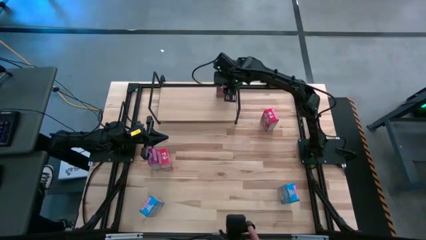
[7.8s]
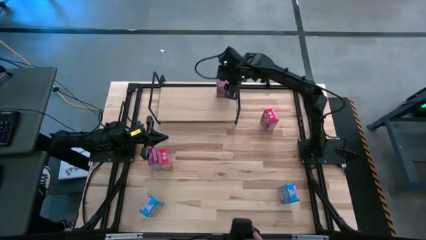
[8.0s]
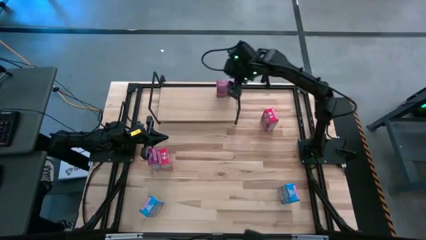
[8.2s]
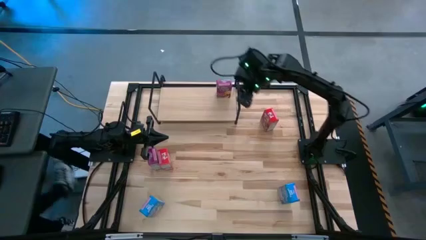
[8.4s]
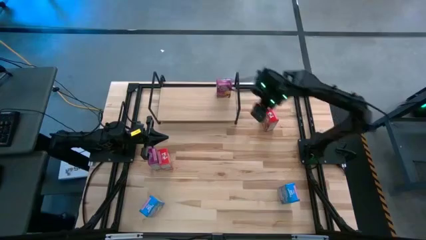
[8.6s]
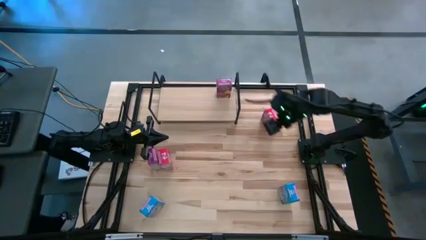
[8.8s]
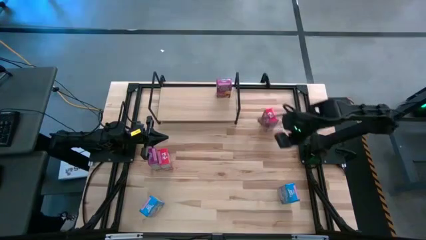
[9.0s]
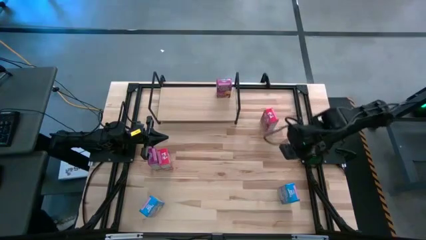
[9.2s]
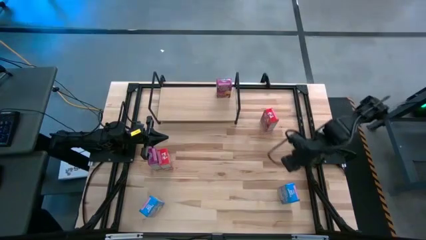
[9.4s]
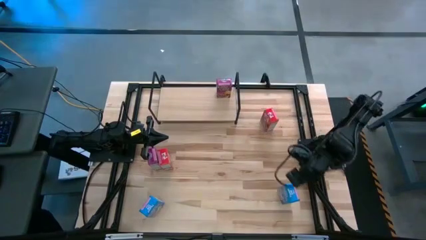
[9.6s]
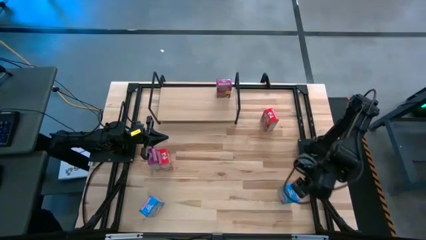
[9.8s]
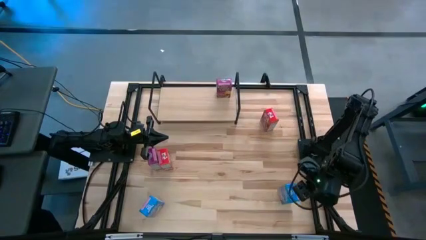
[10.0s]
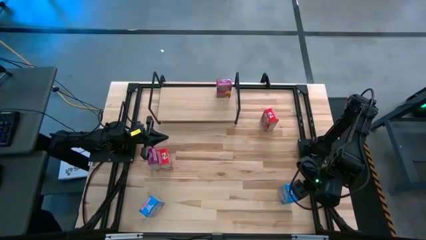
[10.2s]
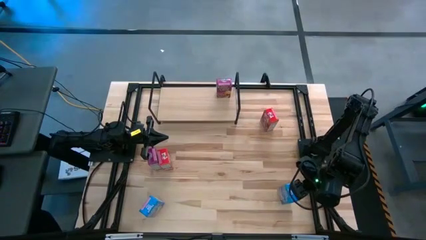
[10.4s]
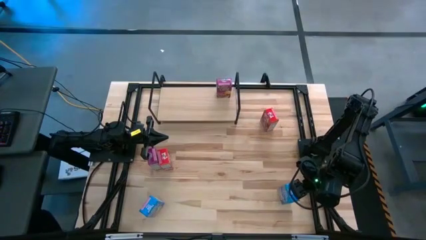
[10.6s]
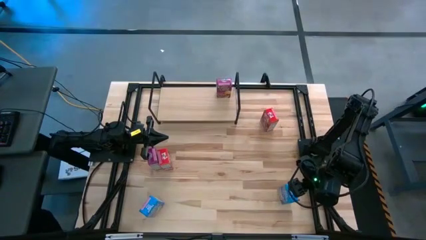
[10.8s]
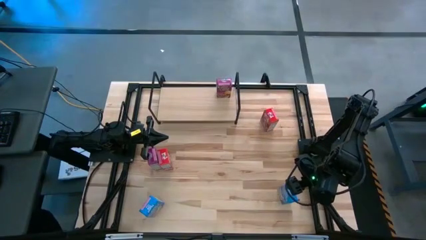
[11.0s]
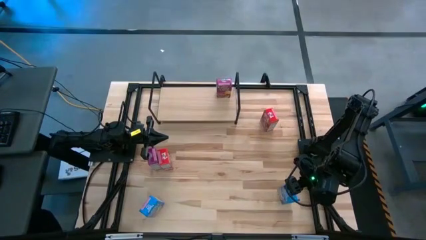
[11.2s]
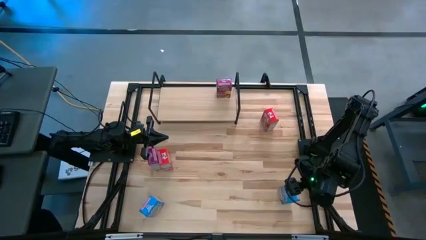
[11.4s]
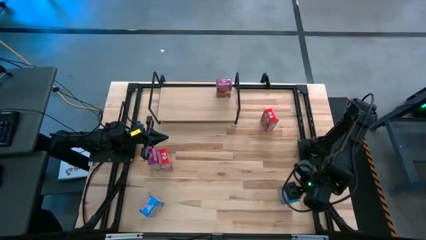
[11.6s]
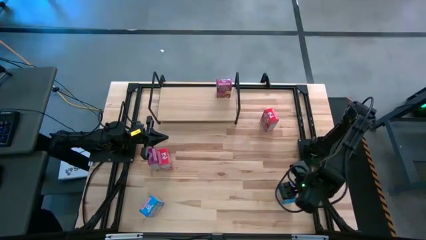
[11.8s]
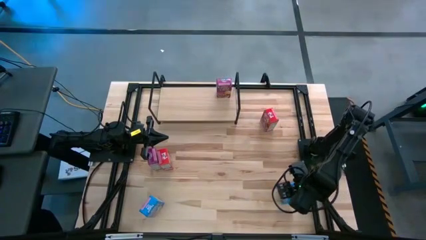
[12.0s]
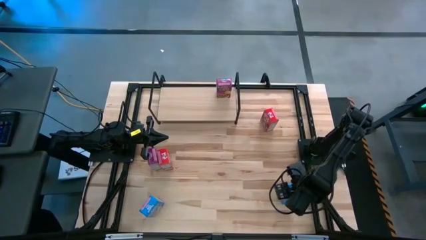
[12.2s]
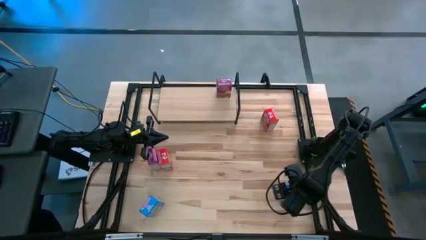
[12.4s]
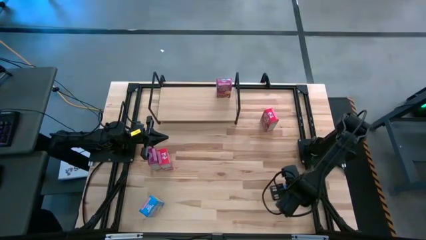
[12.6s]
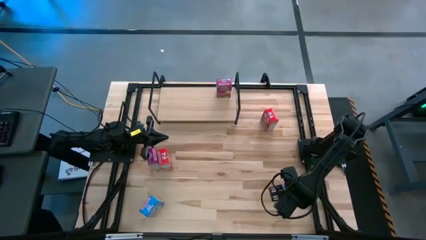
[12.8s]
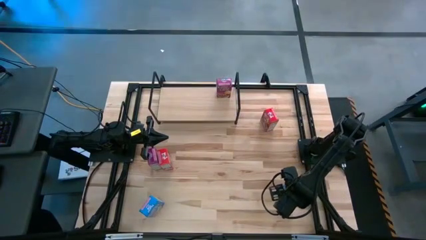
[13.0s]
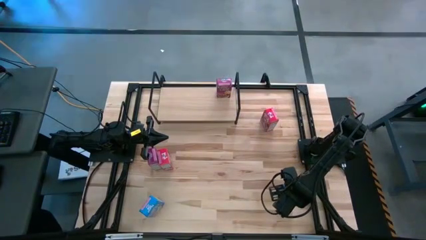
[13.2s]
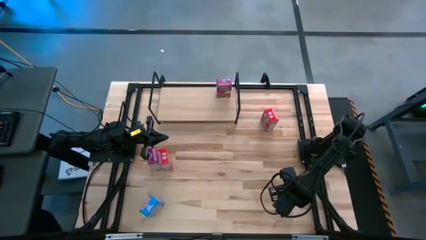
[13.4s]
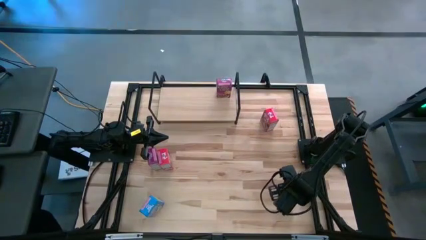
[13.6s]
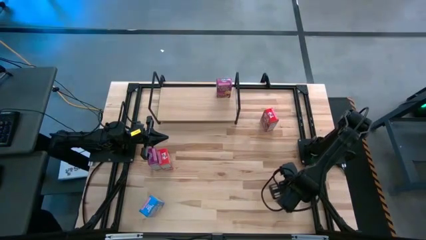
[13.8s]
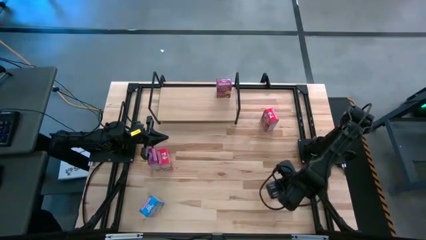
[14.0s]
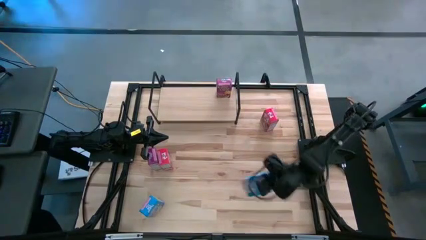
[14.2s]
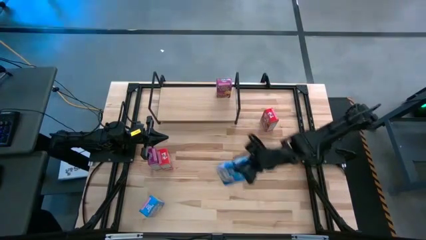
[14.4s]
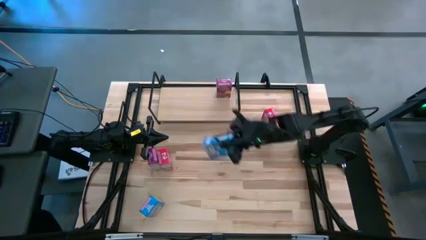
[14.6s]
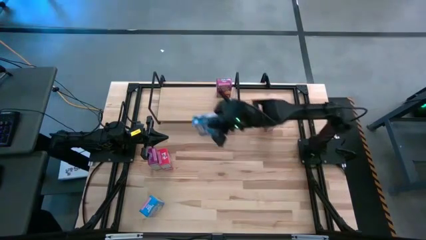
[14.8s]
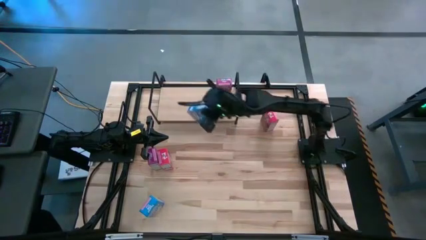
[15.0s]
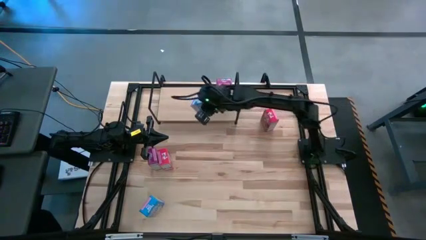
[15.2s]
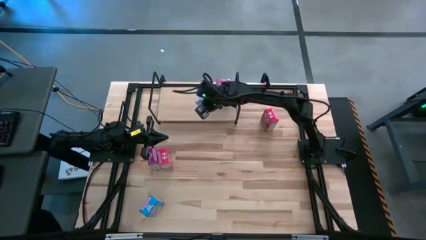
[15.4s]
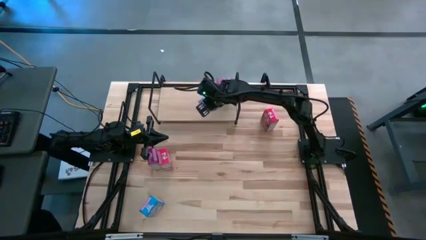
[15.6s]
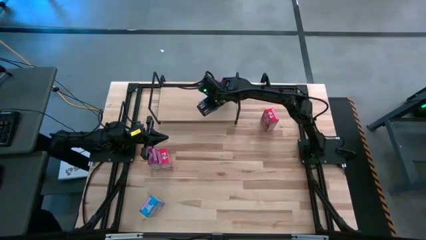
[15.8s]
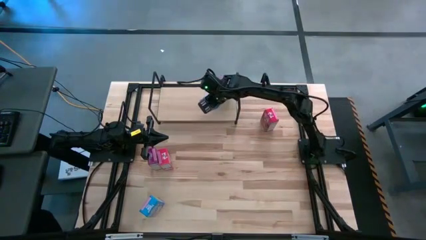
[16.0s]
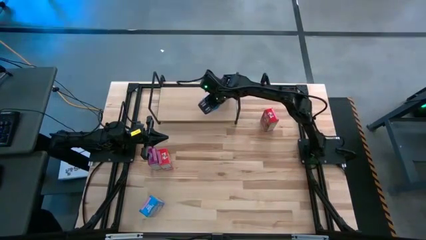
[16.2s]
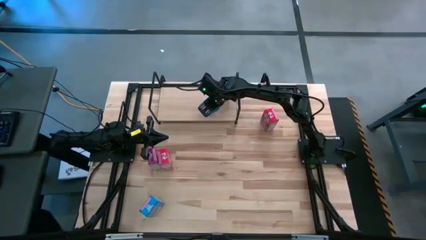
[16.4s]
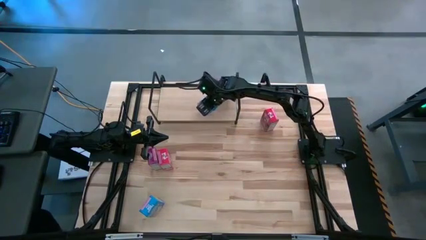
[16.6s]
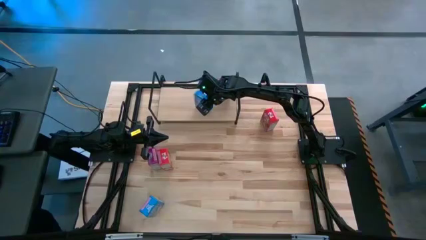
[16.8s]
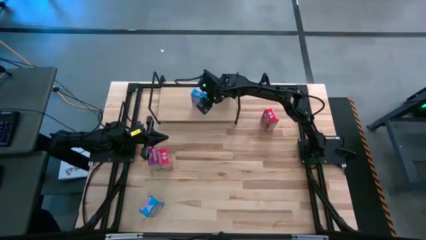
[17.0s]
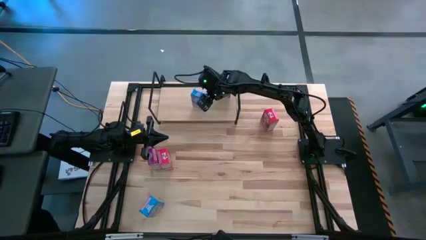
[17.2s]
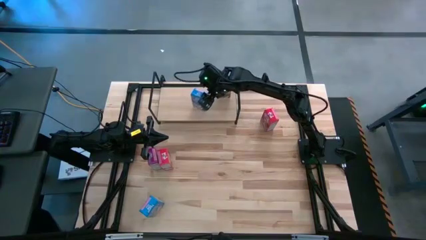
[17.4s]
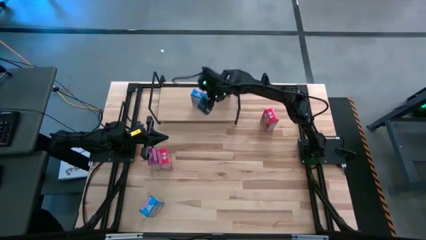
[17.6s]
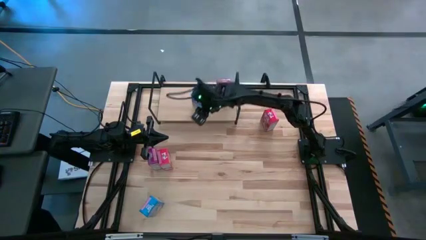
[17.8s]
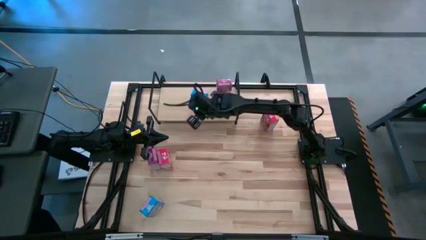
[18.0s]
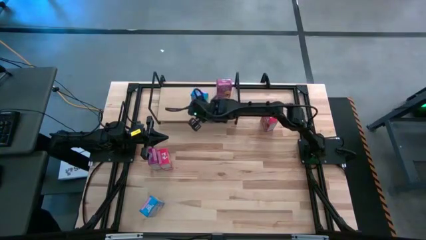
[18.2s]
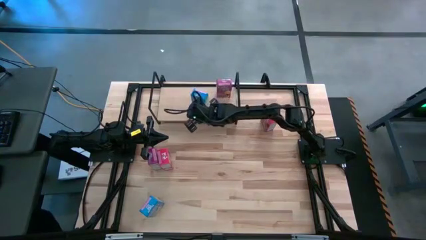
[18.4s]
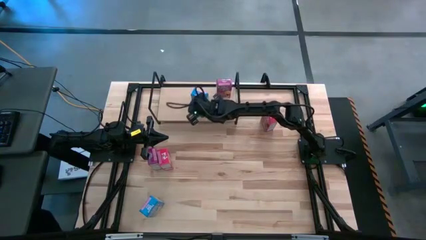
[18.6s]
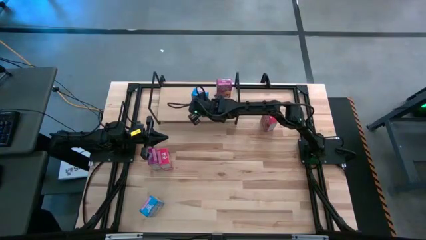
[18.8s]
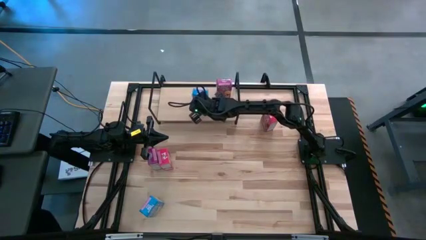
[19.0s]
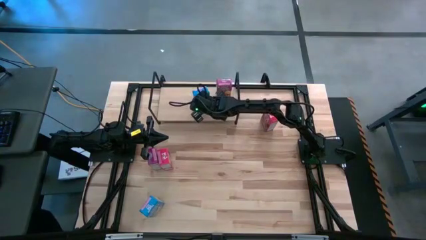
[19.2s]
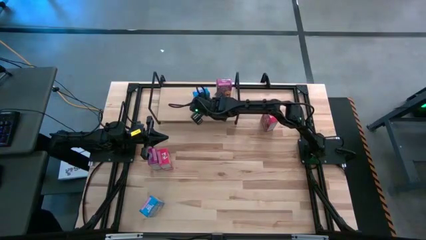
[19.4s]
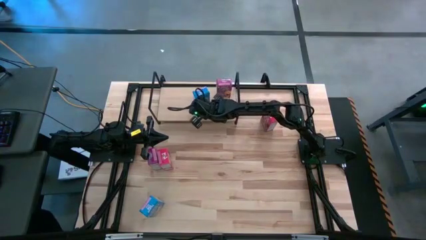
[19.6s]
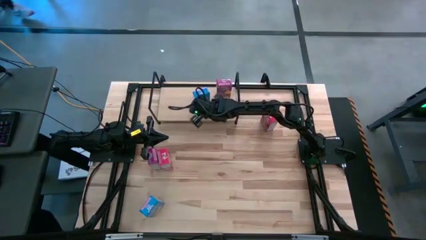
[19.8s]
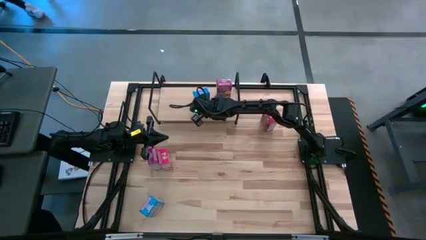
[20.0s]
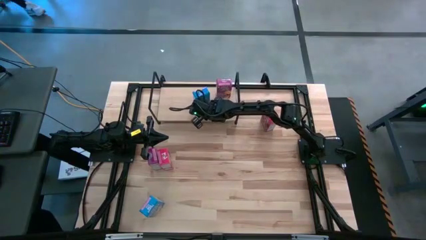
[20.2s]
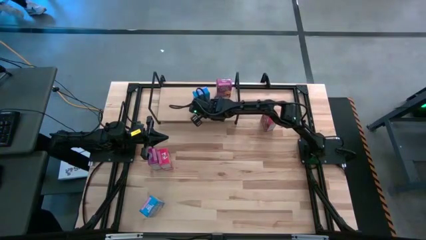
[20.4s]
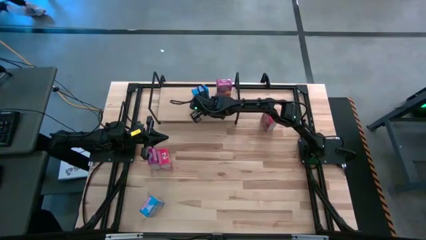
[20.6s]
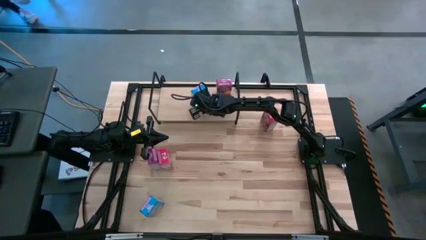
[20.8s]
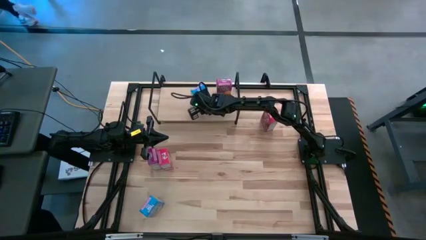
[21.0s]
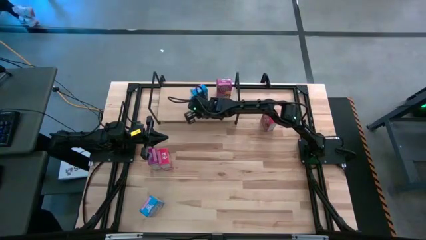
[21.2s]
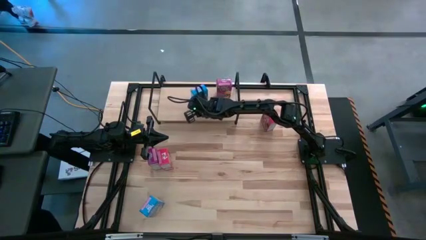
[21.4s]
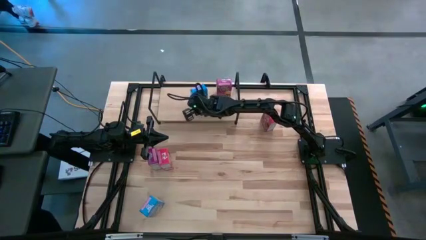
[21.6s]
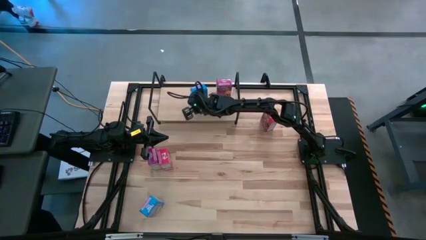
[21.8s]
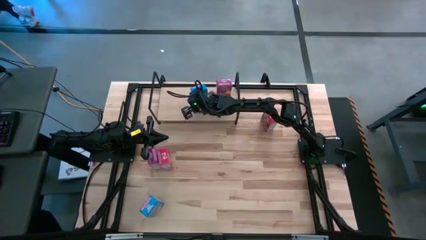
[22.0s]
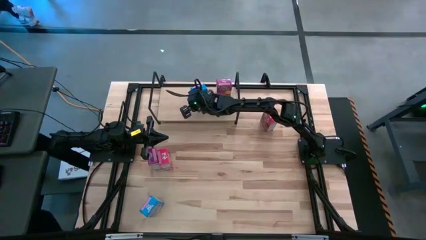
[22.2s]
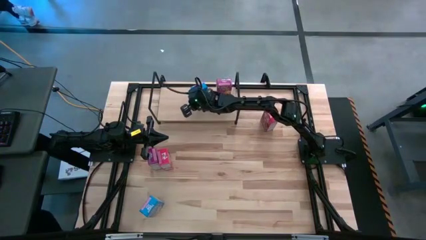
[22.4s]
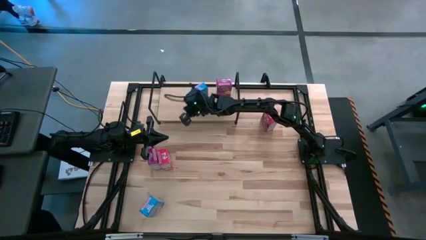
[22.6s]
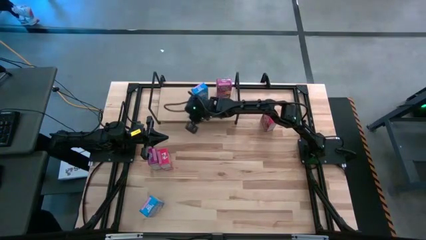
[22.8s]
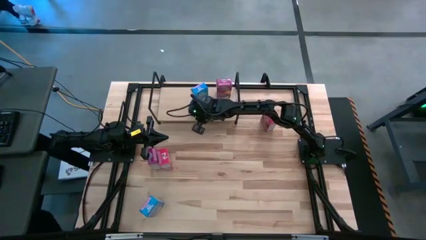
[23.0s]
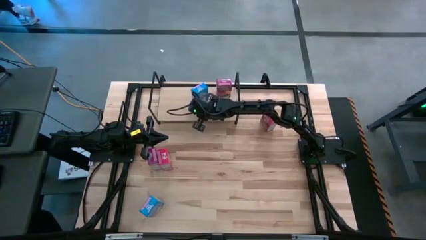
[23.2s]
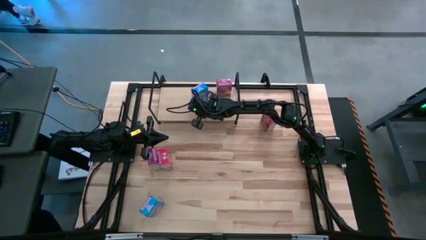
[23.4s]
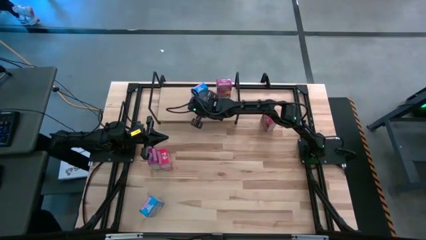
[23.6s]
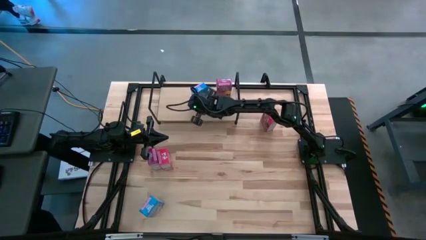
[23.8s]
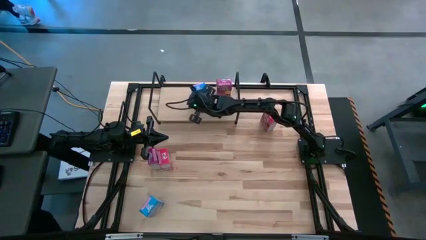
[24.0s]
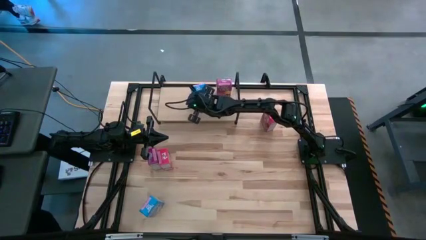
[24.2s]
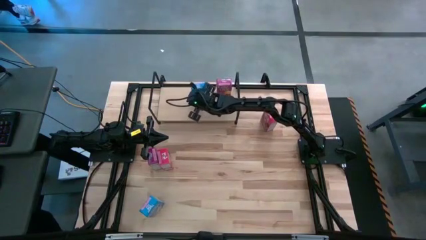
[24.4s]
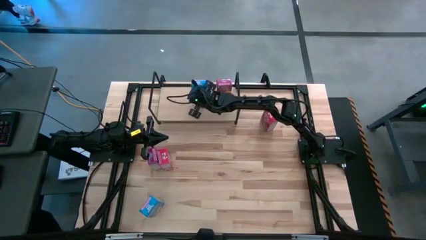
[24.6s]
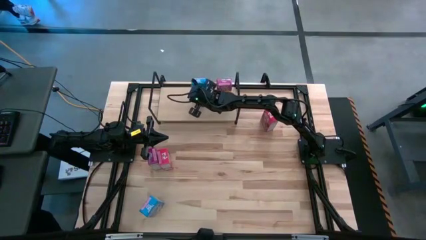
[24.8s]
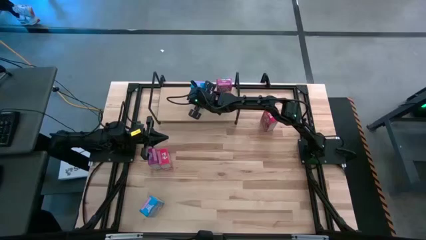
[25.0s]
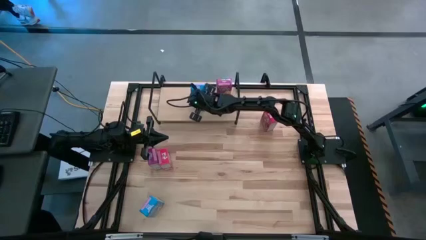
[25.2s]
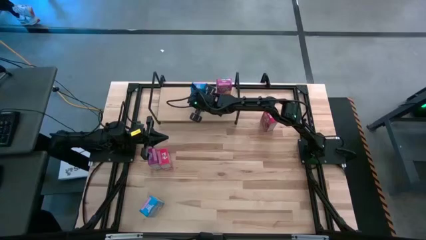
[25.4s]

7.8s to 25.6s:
Task: Stack cereal on shelf
Put the right blue cereal box on the shelf
